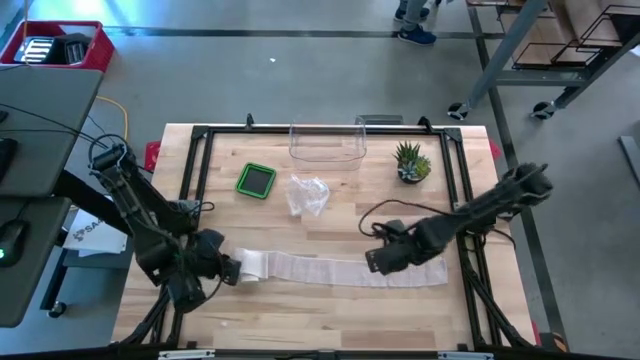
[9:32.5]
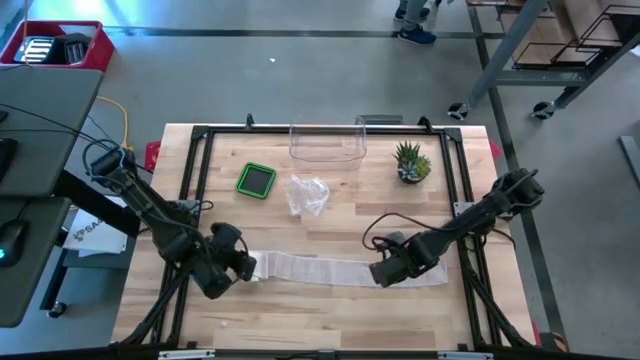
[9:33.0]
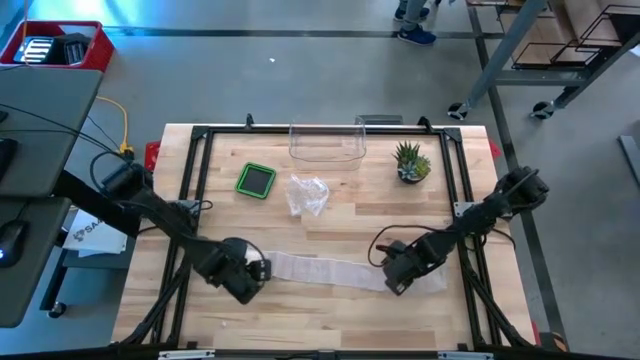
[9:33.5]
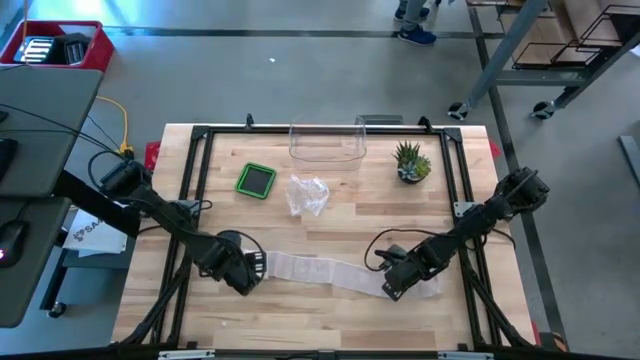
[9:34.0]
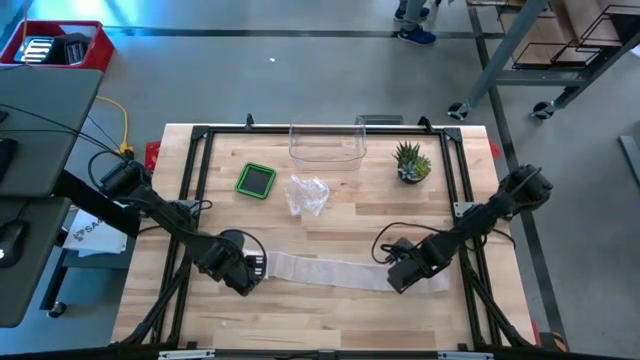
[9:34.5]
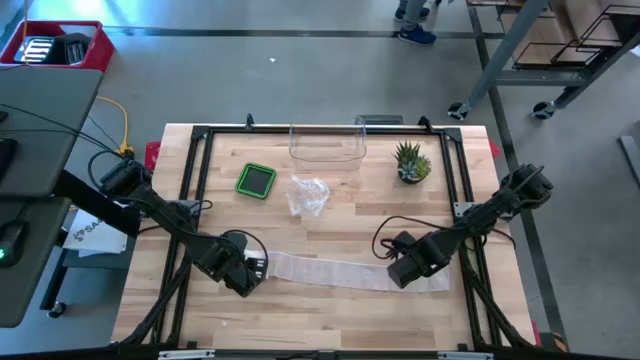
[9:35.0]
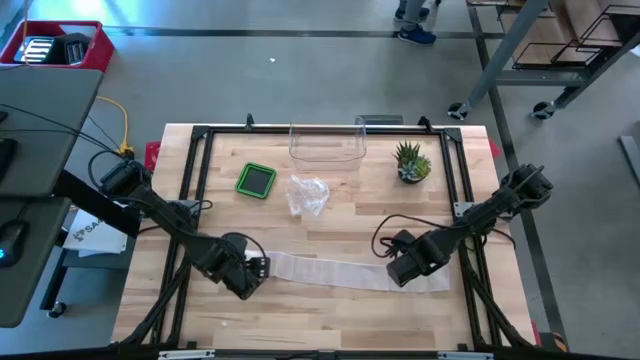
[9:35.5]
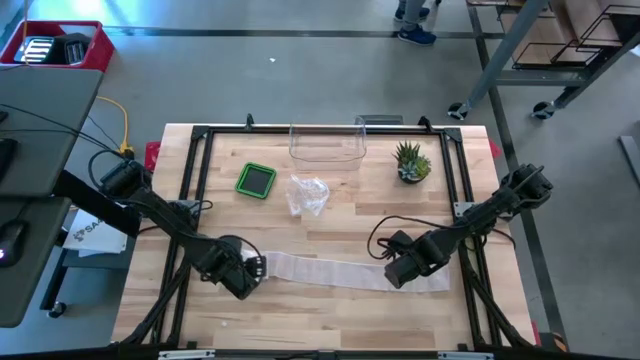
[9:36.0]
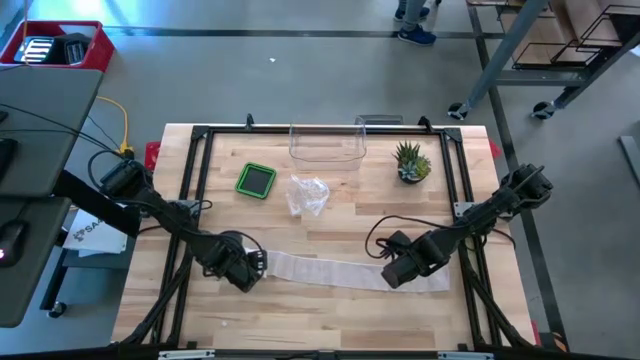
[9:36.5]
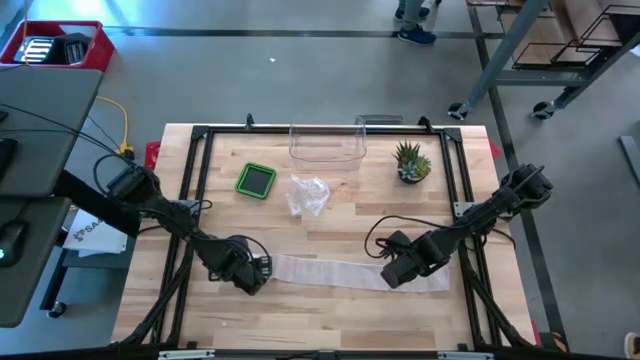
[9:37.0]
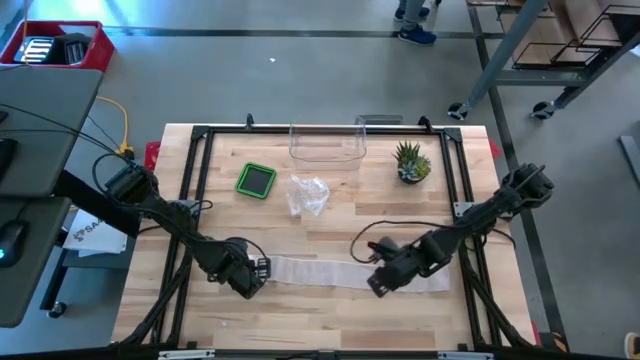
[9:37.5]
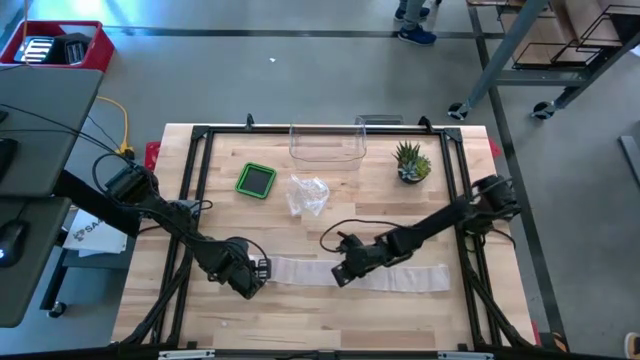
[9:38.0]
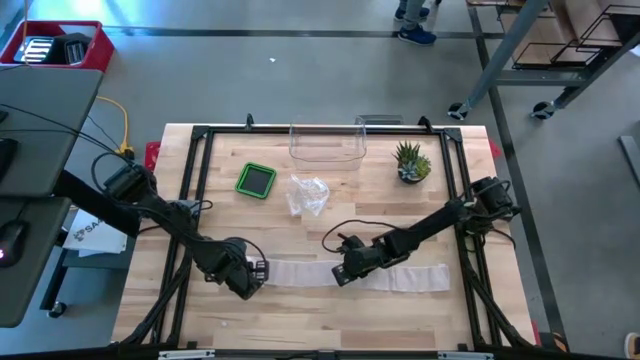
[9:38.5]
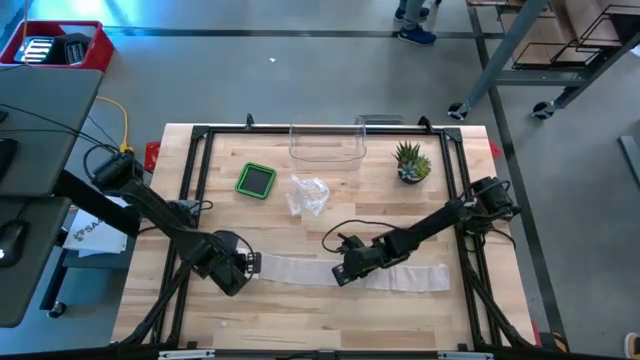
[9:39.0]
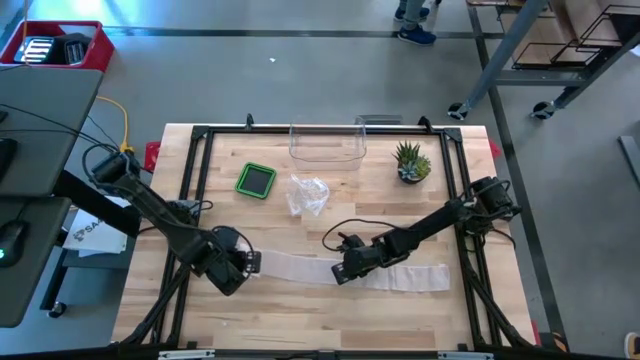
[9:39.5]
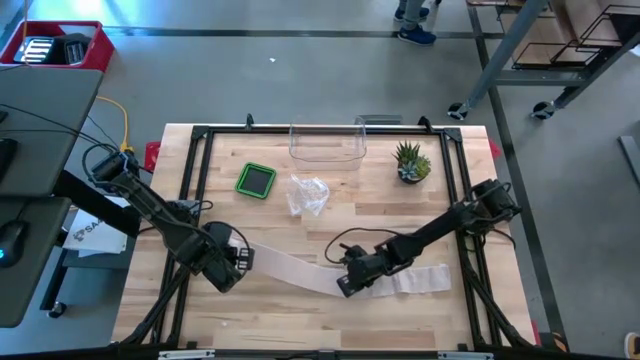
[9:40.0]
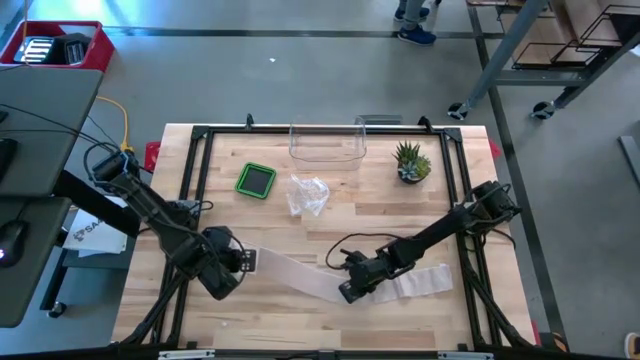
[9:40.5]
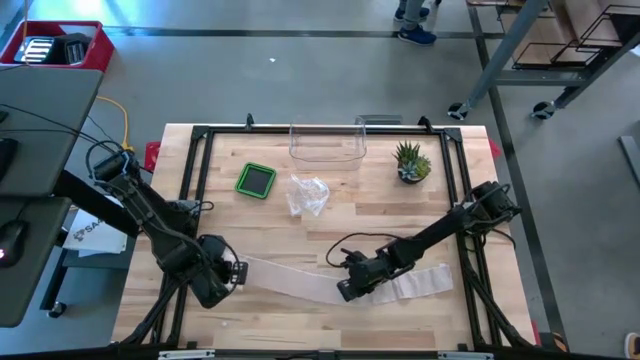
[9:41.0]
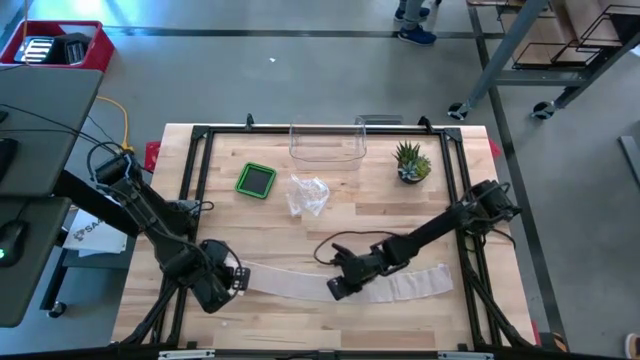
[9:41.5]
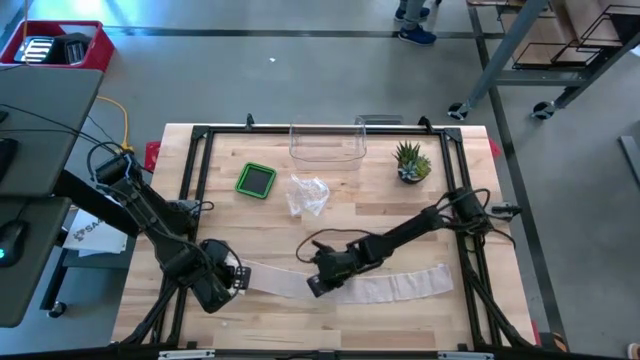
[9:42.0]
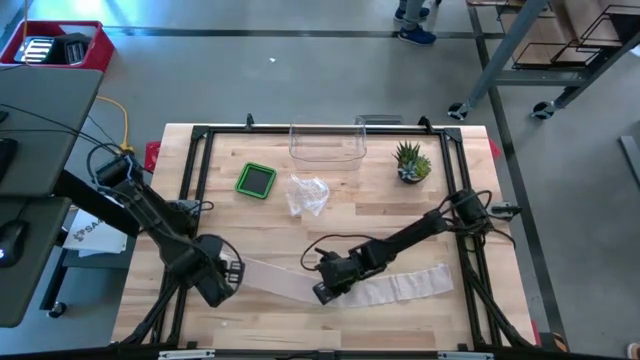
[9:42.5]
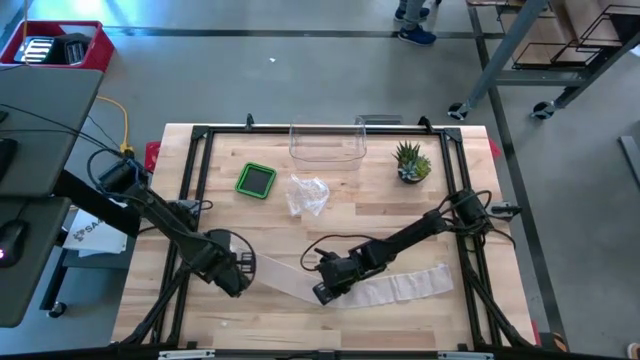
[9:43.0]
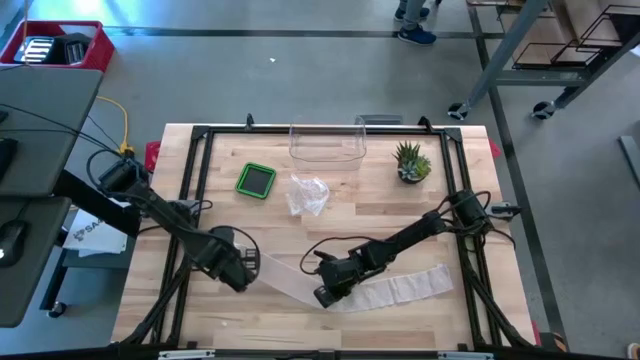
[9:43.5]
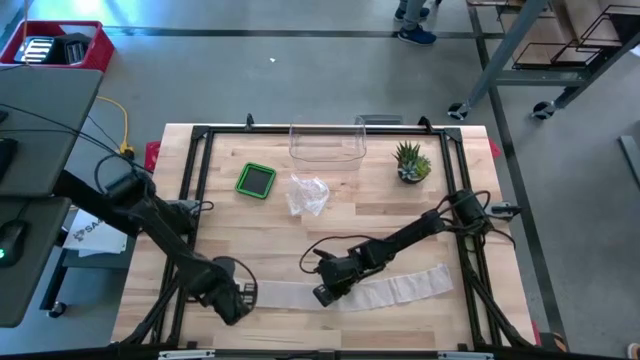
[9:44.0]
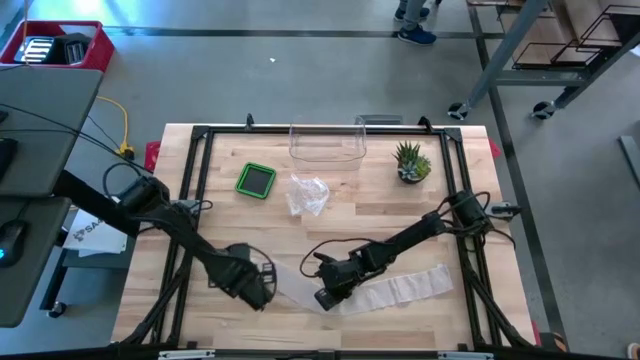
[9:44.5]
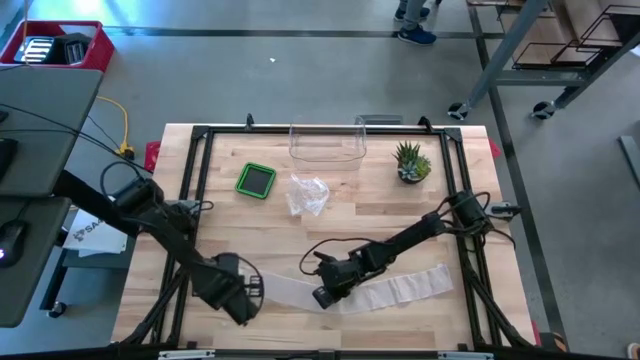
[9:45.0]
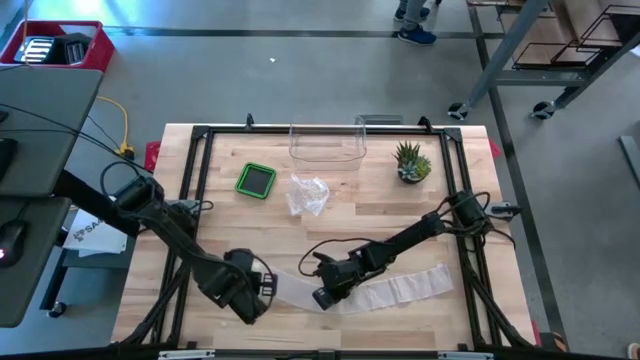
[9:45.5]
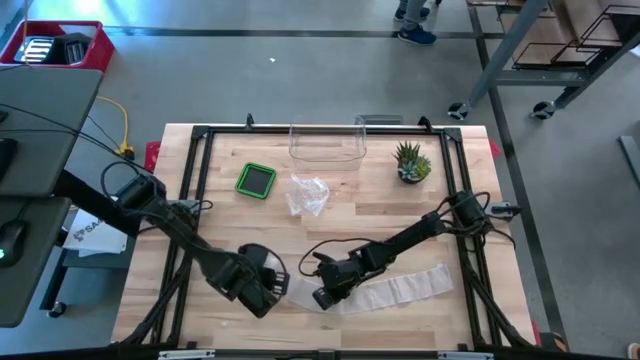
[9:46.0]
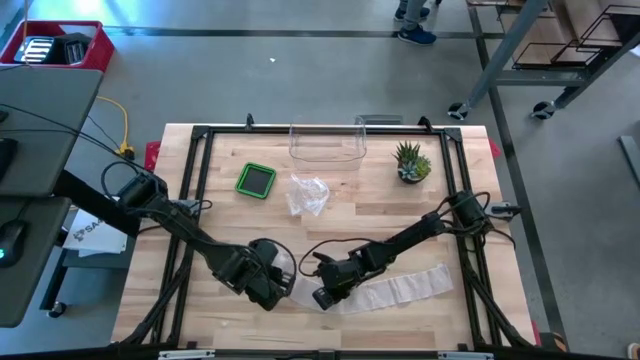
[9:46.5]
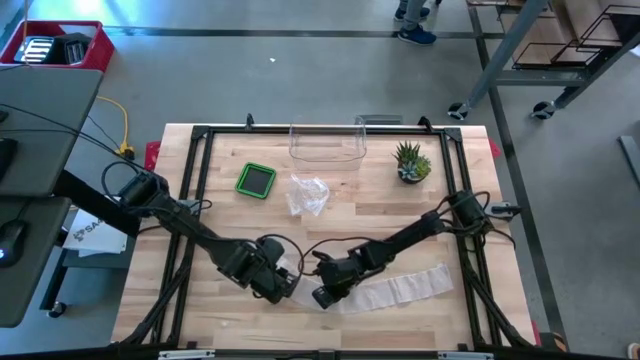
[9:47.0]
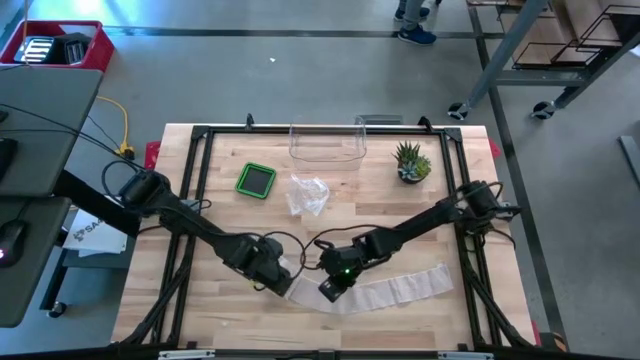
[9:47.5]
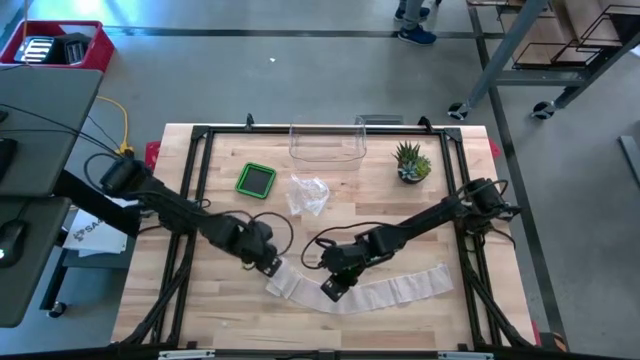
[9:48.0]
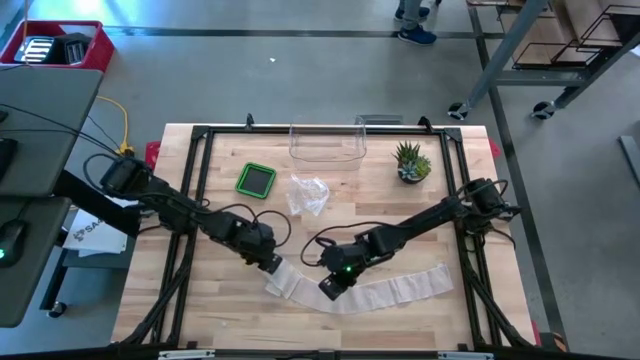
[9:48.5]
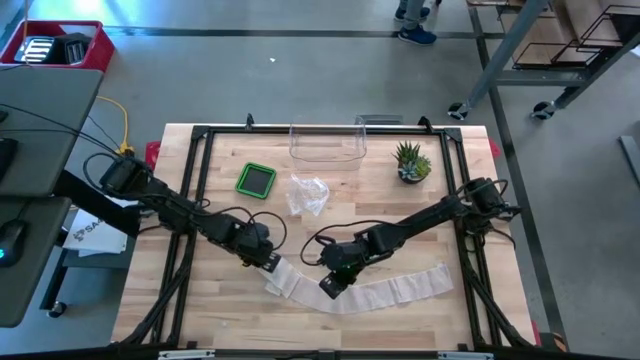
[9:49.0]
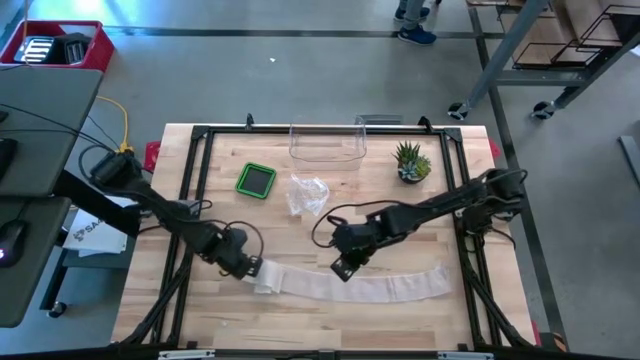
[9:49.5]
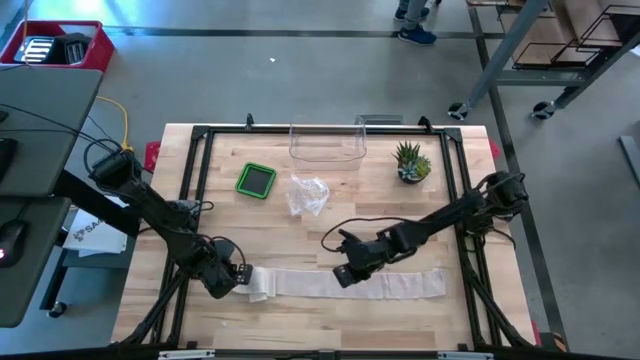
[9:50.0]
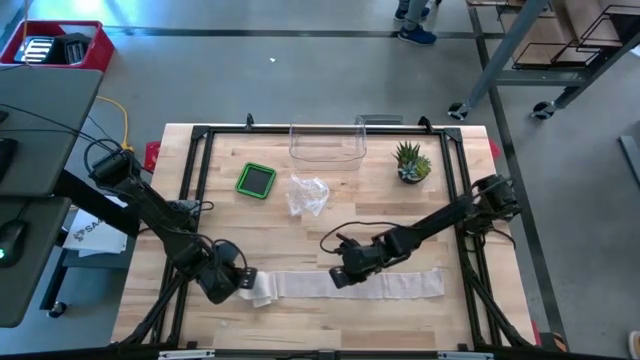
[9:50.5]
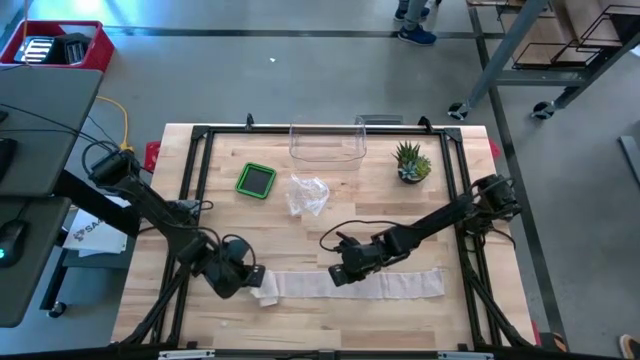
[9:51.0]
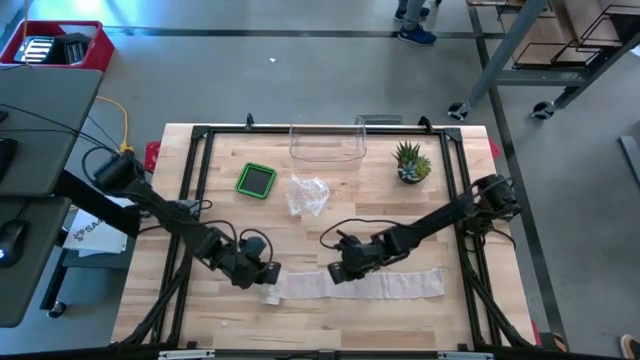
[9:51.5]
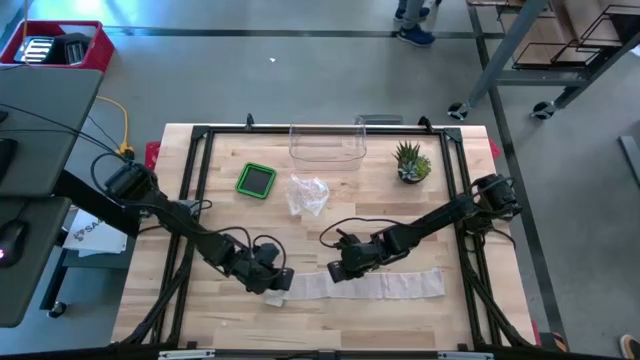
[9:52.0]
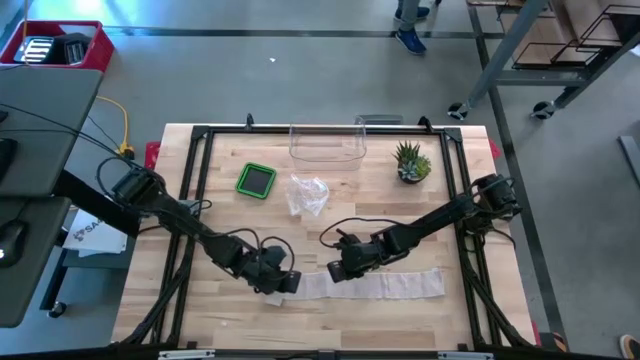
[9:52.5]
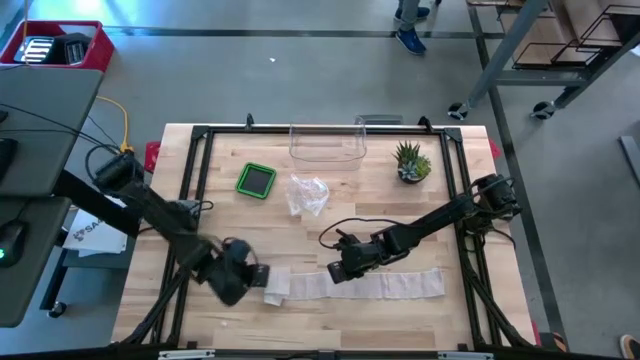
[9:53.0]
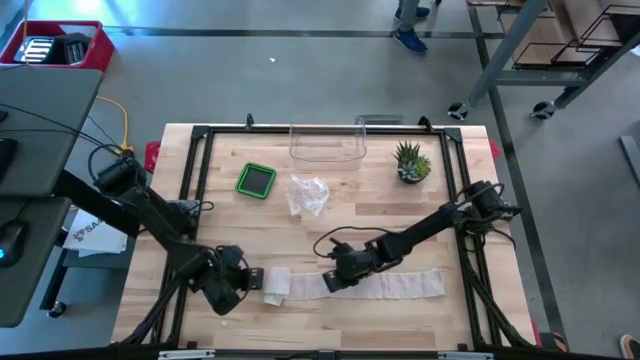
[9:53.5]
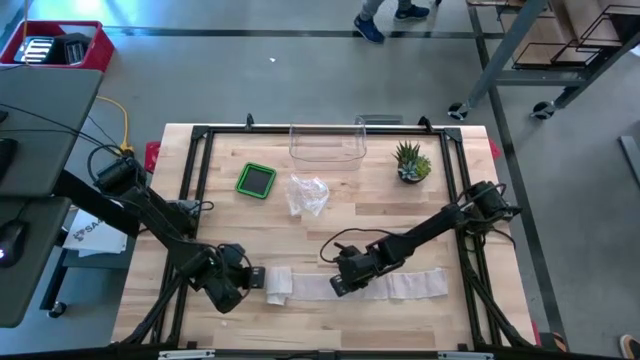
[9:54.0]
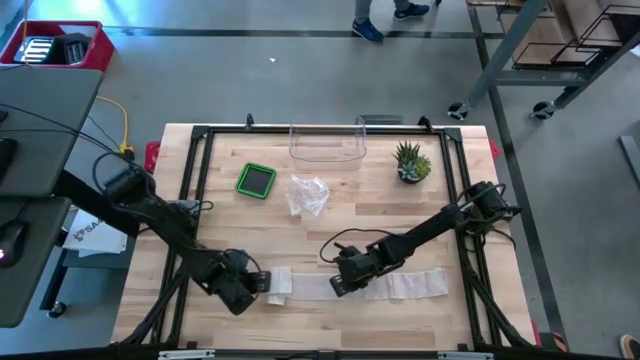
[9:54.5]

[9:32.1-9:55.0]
Task: Roll bandage
Roll the bandage
